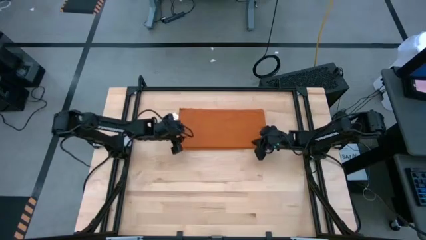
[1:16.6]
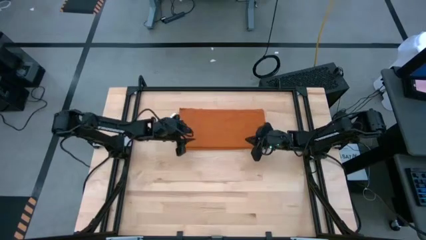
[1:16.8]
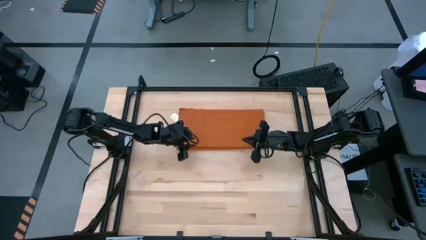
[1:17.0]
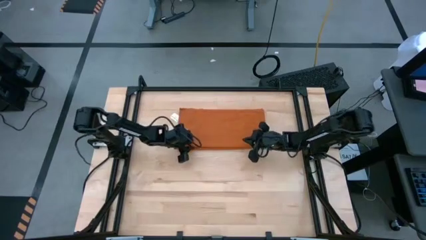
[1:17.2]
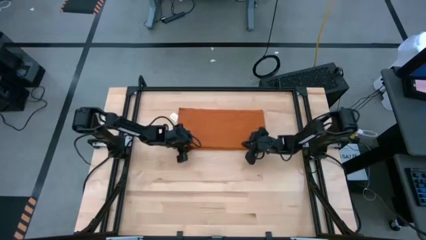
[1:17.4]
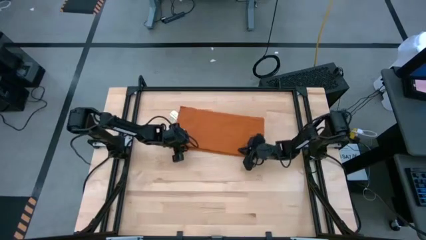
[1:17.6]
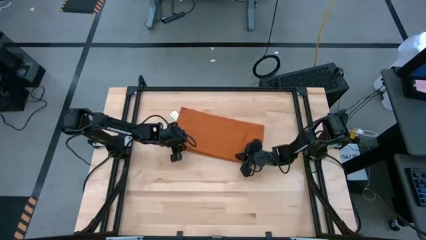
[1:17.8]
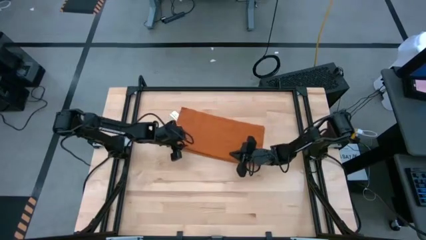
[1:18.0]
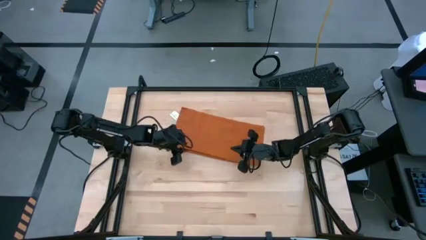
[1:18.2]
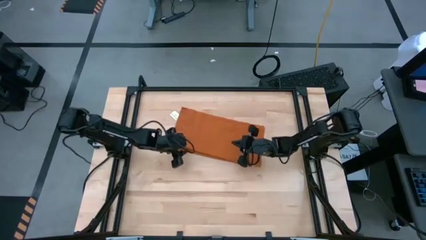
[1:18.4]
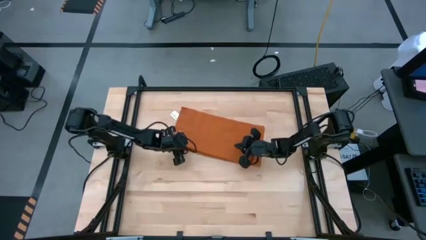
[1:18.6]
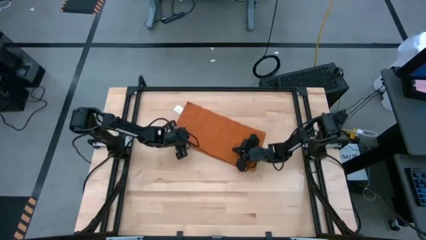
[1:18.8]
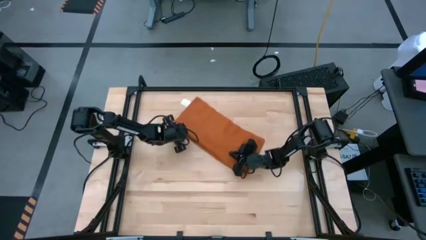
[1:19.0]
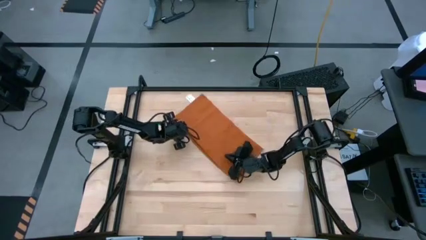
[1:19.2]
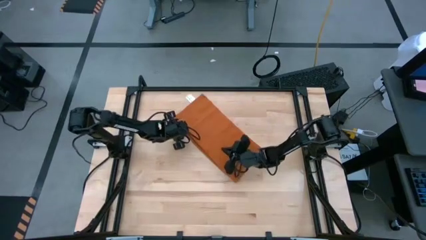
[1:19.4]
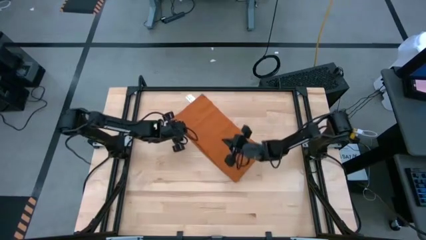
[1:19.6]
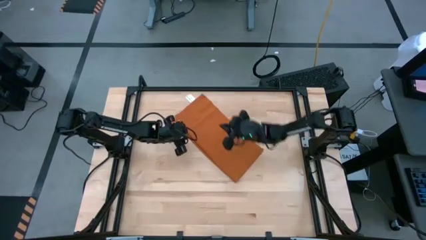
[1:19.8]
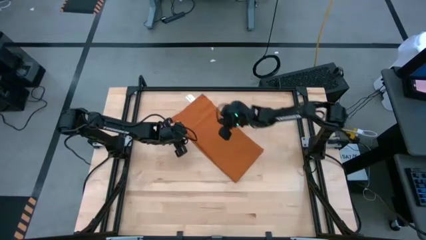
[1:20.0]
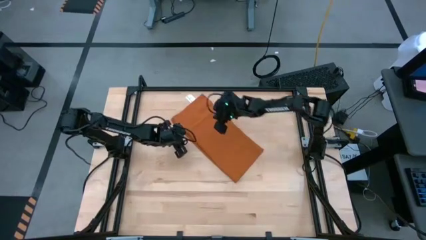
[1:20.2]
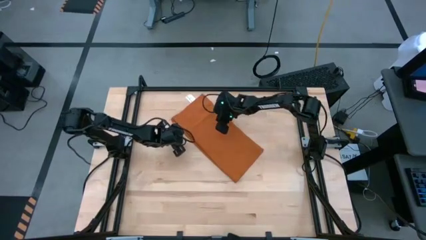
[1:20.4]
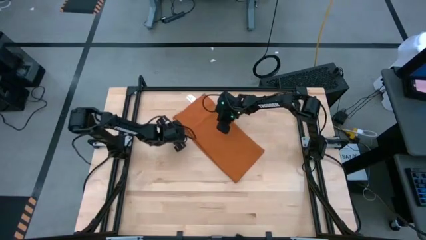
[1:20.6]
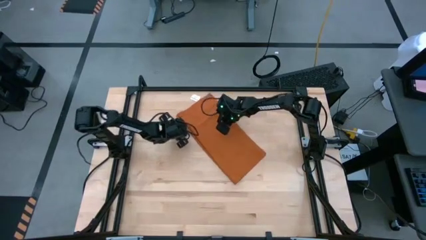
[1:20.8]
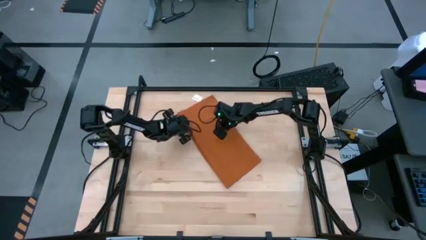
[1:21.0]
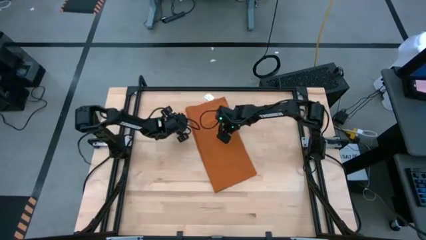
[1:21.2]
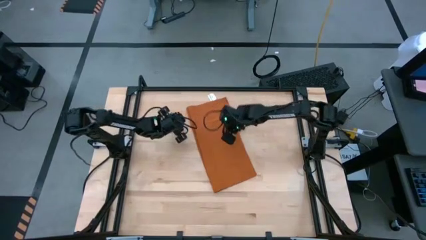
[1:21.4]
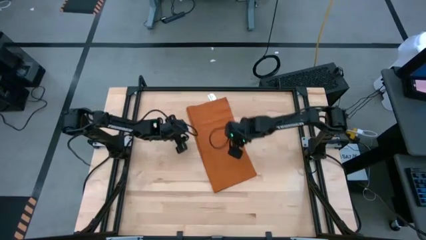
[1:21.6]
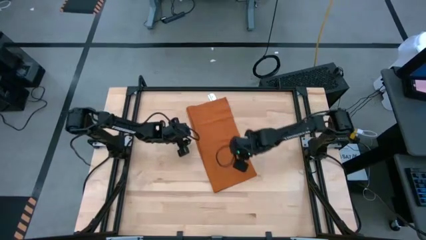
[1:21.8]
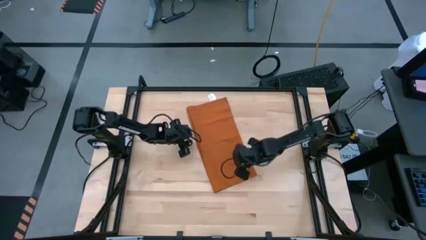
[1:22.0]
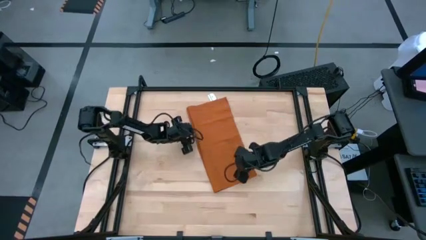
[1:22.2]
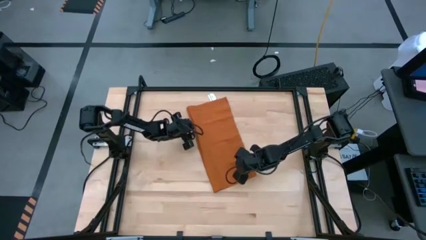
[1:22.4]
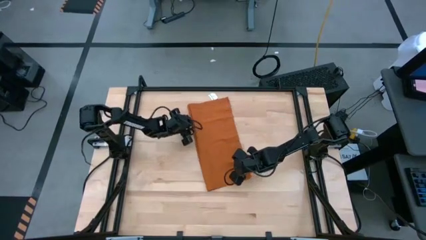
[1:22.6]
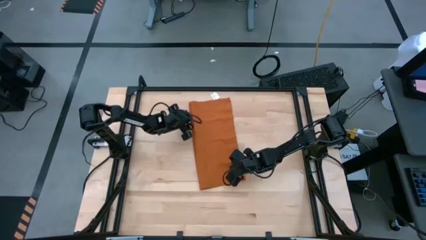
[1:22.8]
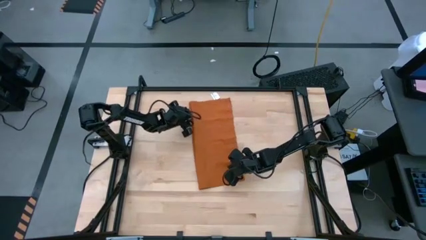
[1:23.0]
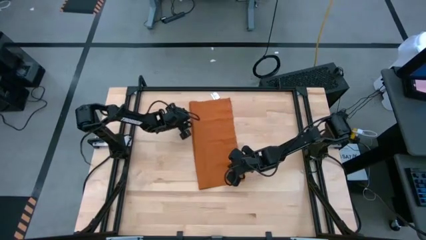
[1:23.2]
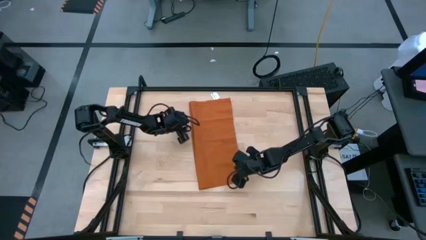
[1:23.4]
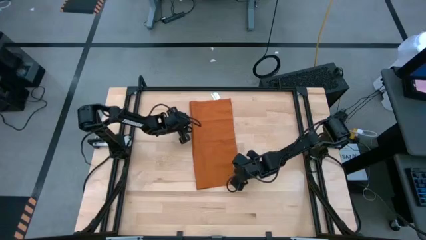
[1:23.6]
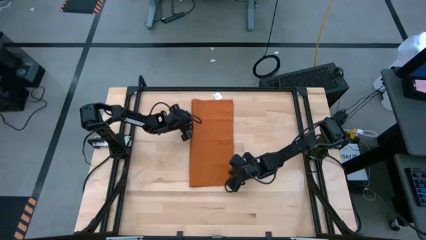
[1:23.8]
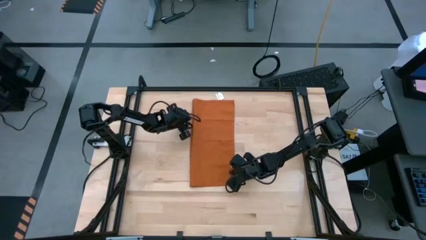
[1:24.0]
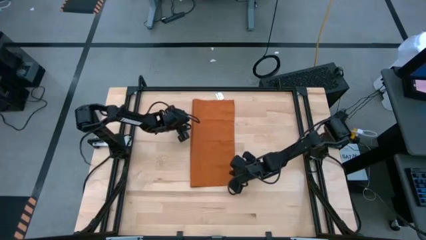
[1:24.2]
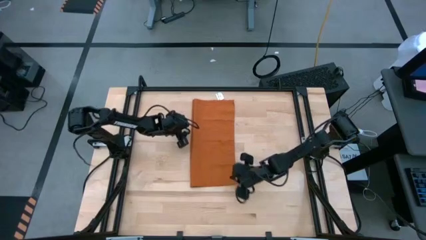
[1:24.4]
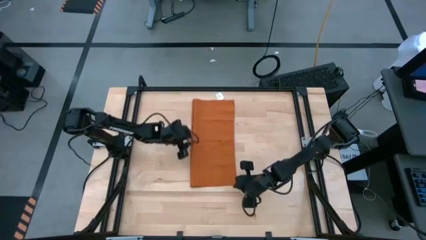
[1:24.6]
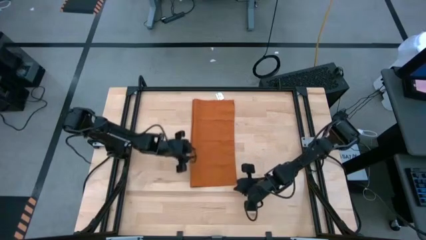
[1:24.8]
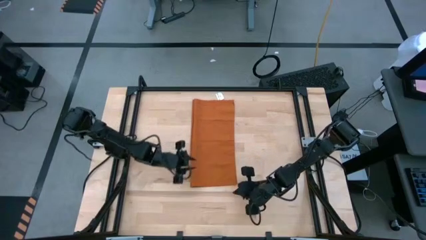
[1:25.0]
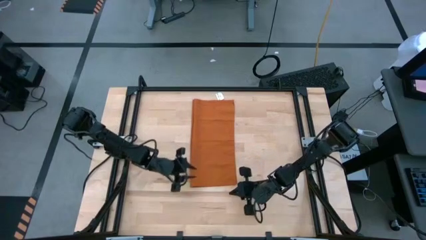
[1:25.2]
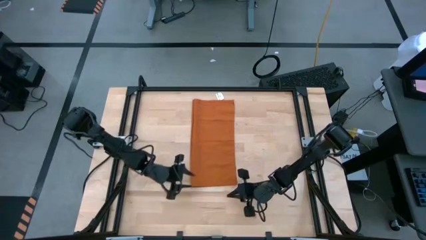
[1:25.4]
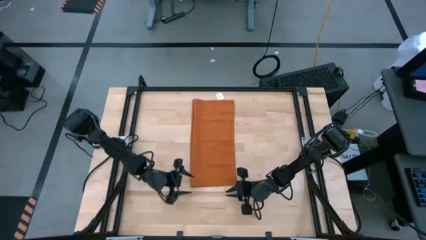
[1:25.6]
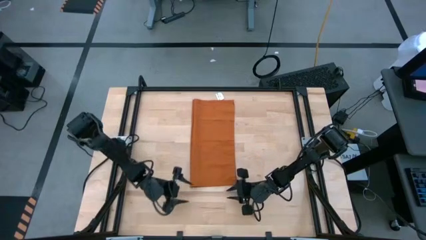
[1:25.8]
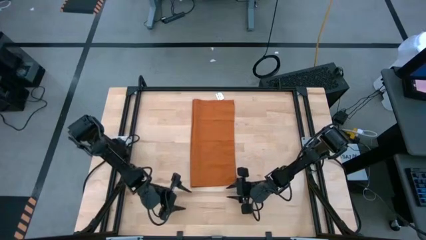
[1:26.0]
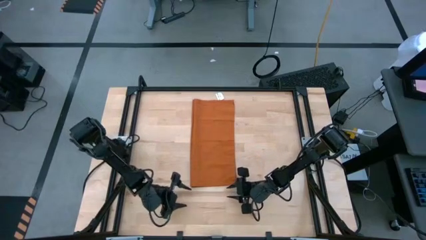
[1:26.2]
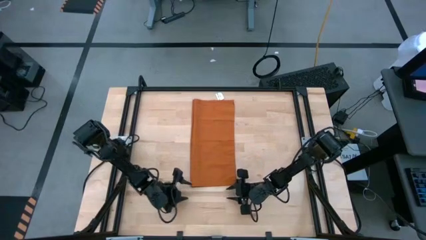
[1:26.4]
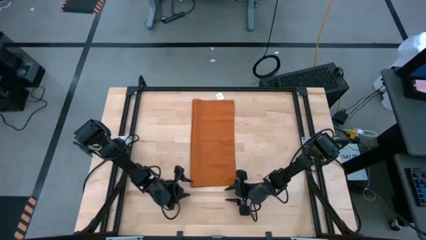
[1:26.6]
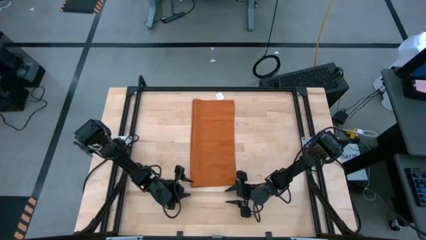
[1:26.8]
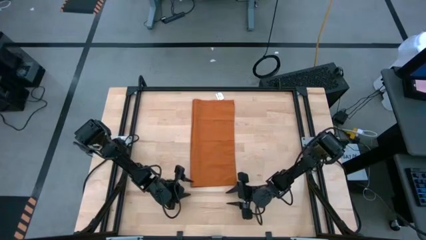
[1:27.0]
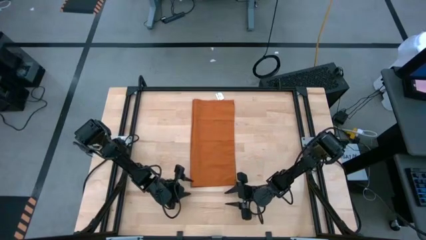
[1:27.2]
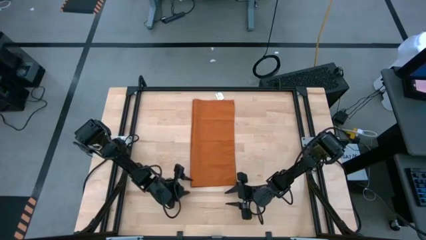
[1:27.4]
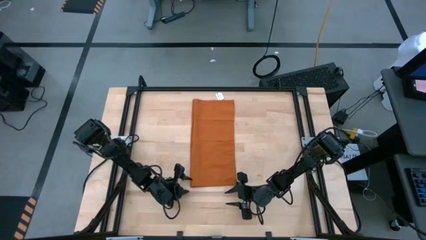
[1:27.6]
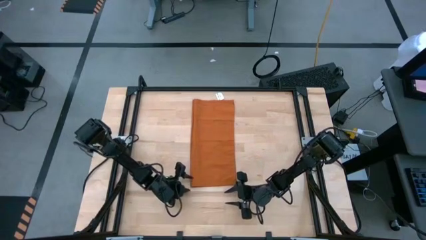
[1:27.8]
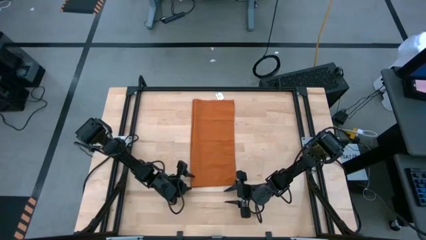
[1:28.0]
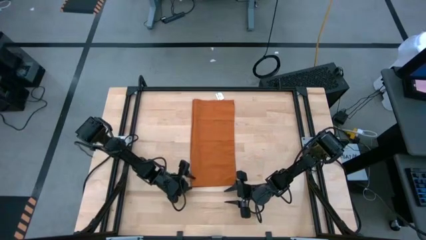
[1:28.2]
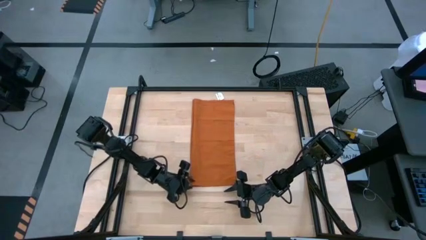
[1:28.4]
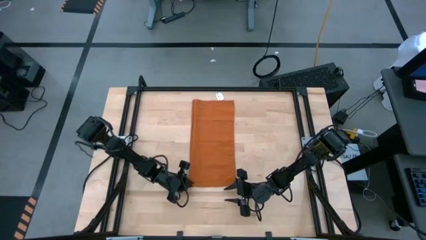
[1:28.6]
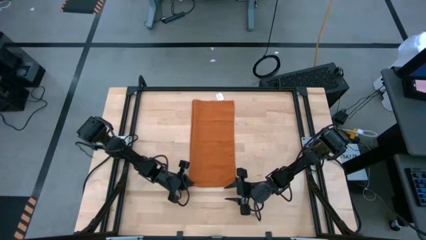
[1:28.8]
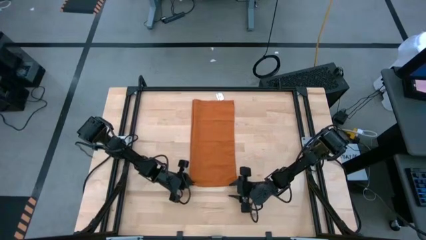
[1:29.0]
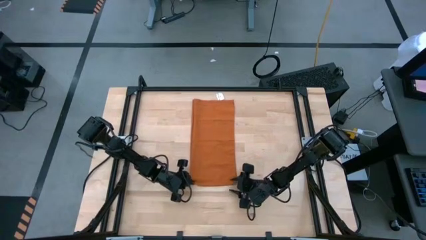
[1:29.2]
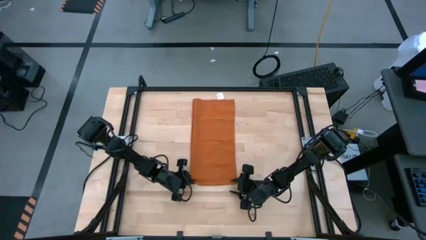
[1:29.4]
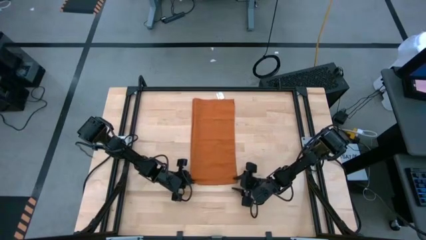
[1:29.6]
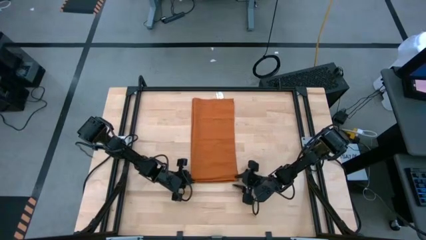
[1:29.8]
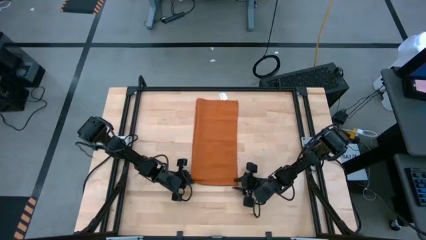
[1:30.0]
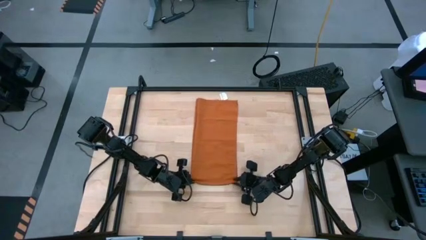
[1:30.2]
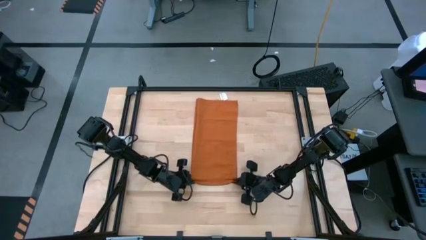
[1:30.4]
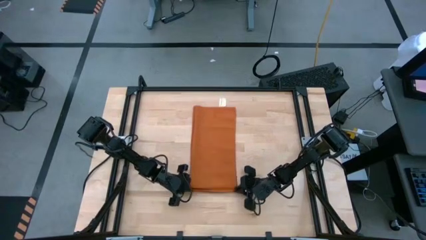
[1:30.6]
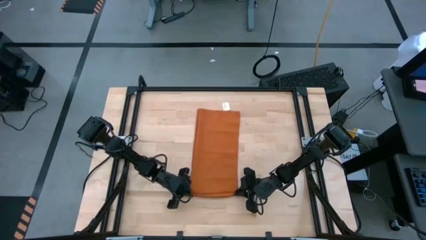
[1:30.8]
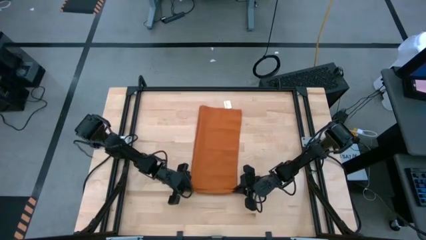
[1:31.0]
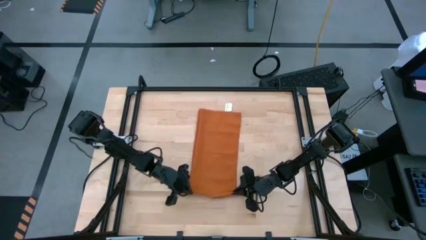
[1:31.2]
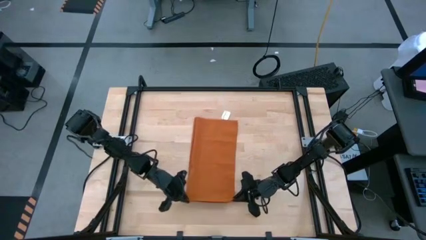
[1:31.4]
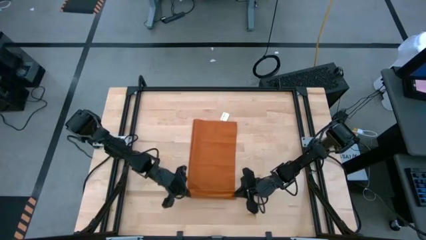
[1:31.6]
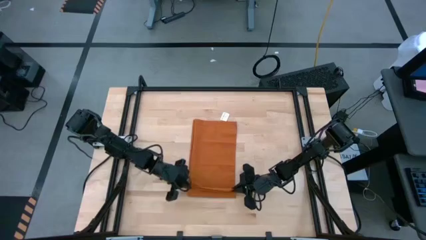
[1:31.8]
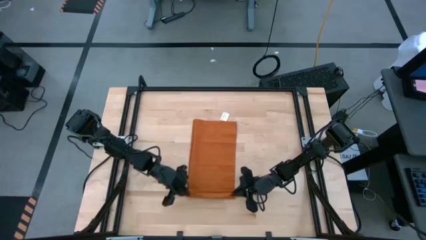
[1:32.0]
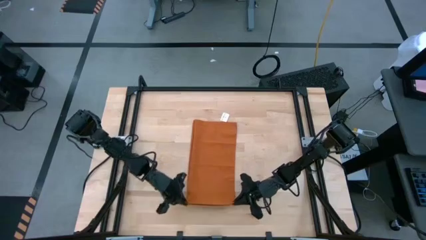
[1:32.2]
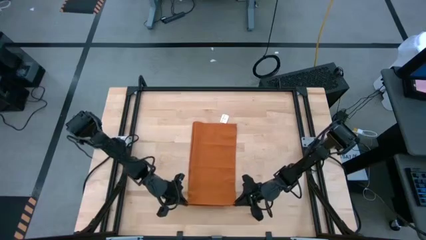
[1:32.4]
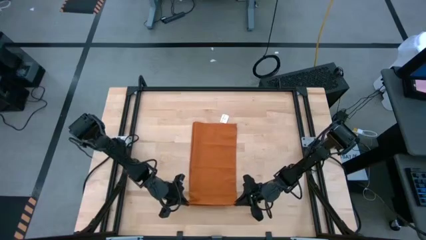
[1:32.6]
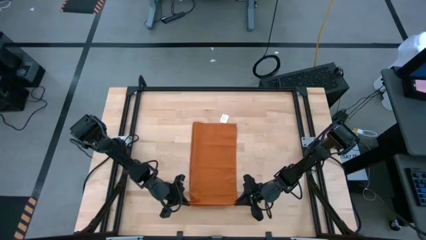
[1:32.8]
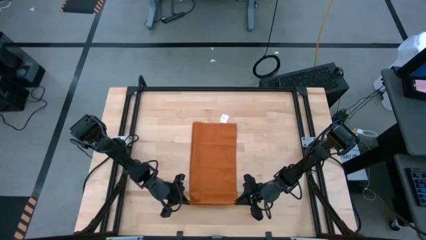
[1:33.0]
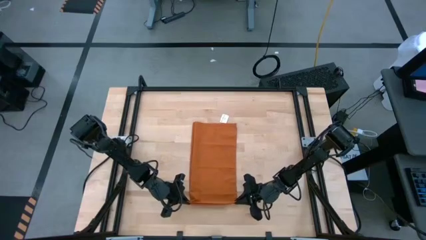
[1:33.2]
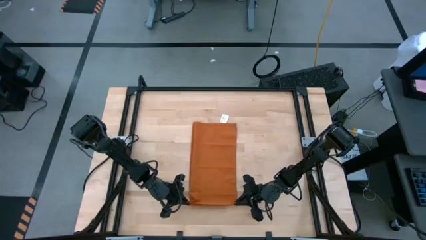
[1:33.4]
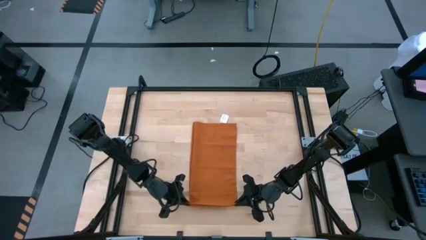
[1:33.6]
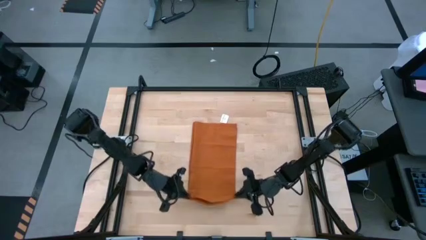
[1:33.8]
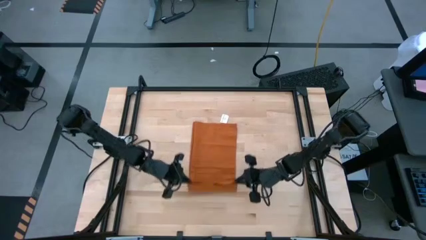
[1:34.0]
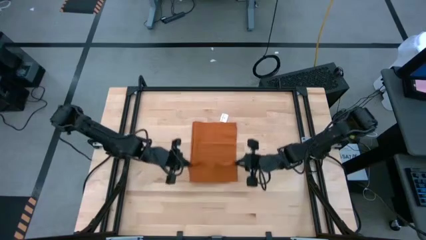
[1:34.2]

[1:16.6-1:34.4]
Task: Roll towel
Roll the brown towel
